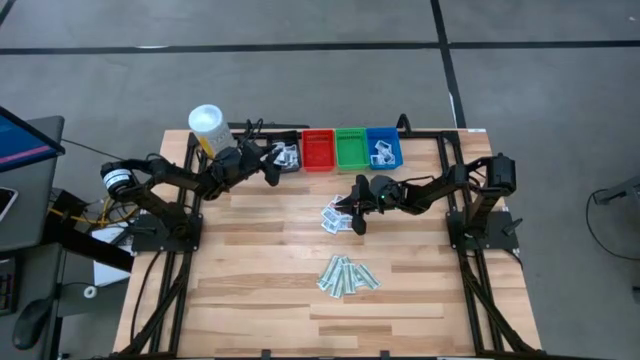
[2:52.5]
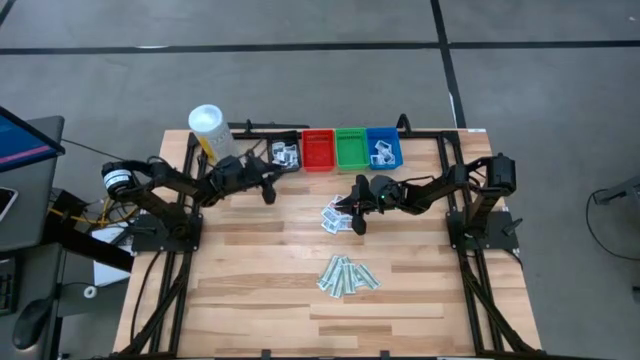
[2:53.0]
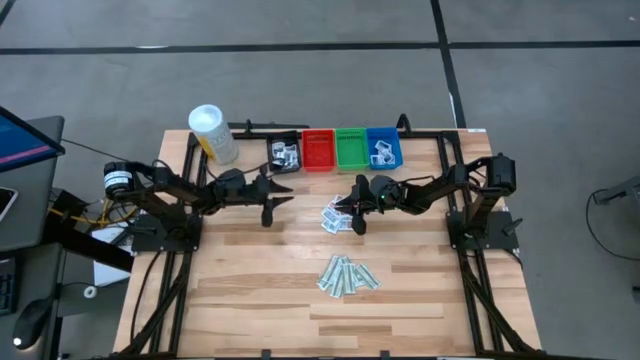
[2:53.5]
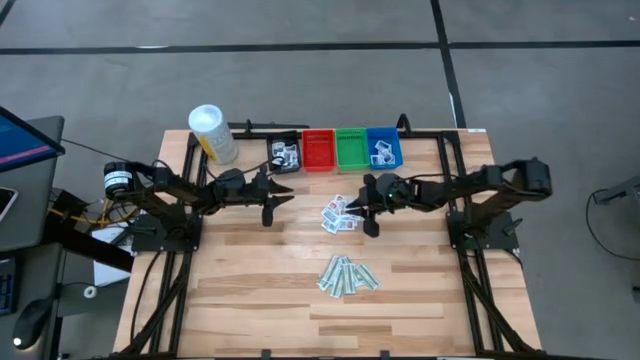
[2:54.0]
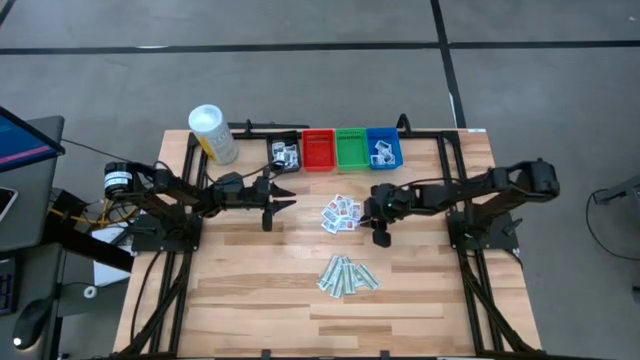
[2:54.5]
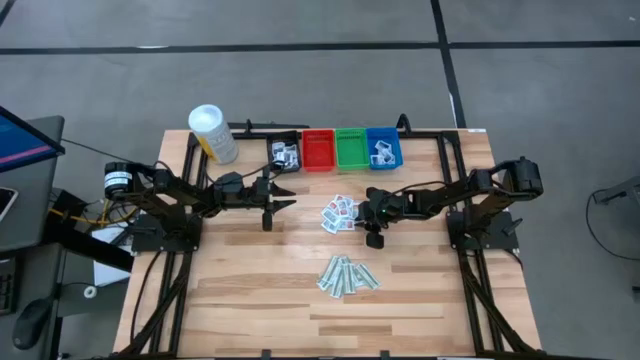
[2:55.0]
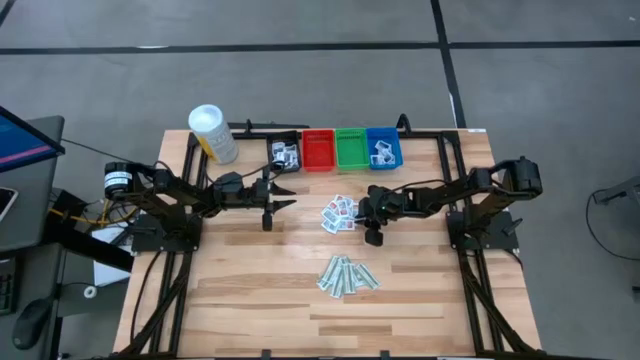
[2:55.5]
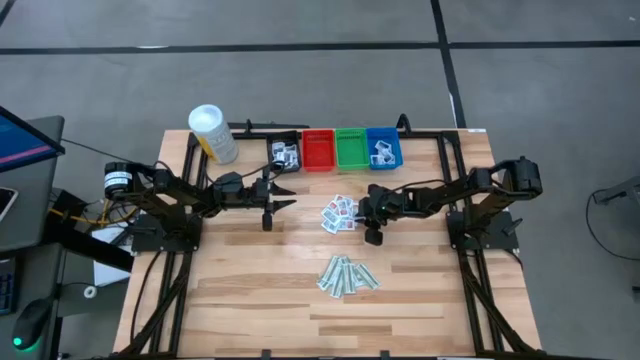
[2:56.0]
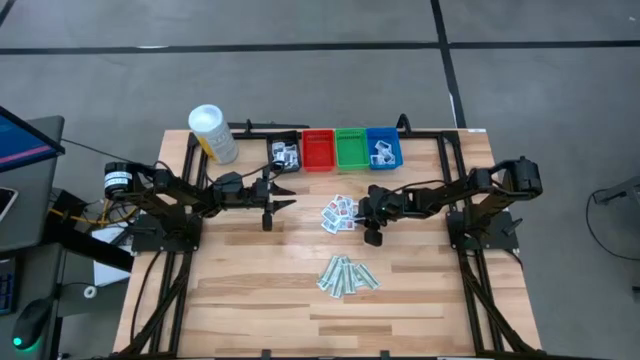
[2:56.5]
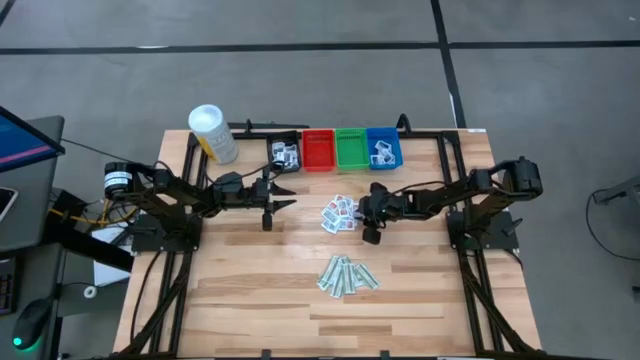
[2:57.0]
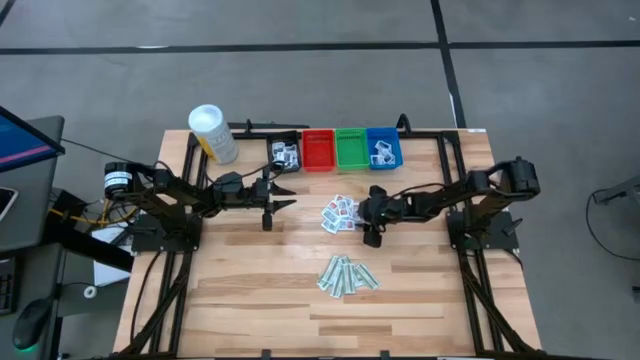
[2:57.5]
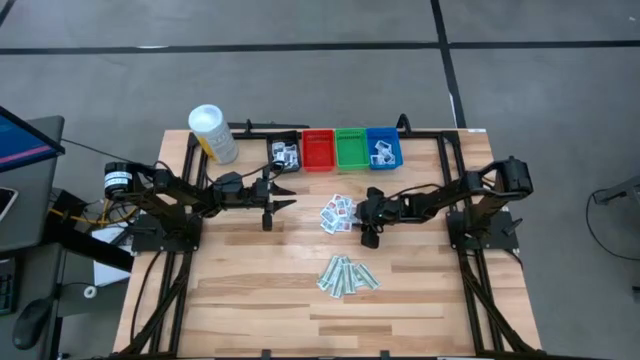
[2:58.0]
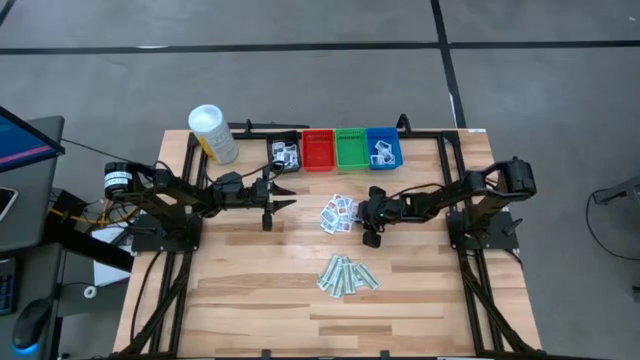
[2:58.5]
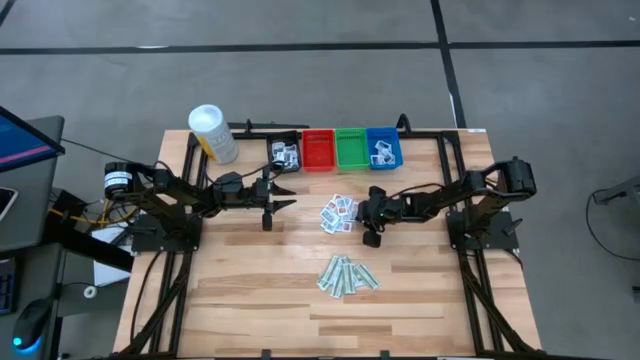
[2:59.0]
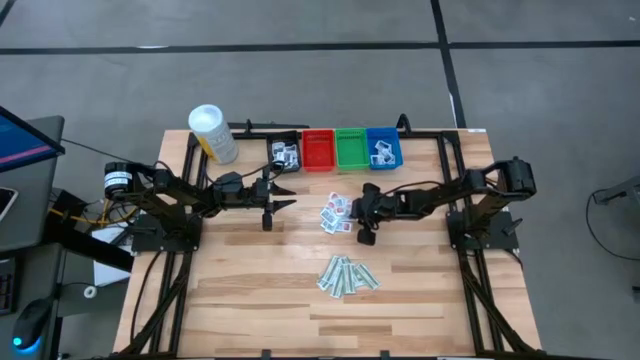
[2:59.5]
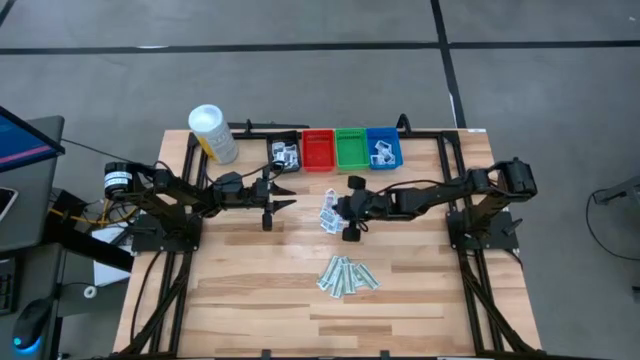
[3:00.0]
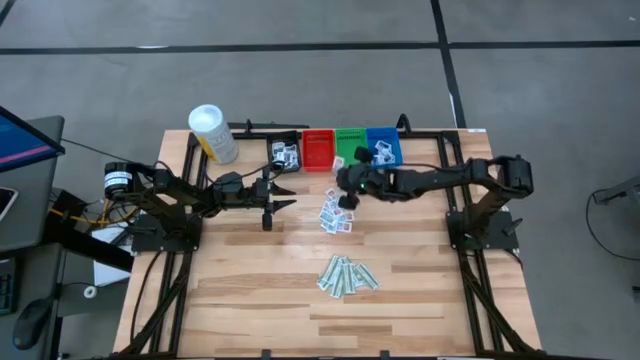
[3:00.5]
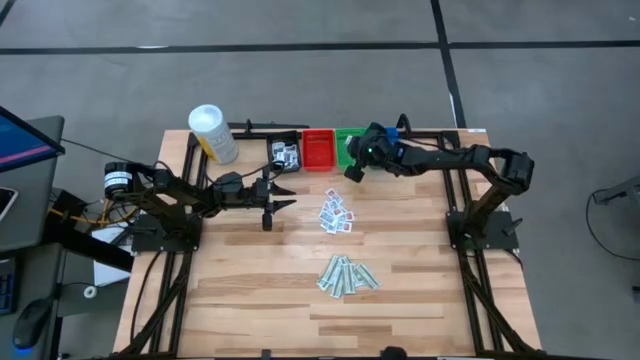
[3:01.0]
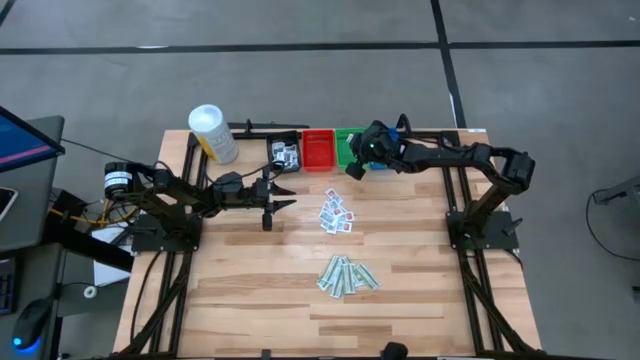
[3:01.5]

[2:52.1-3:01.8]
Task: Pick & Place First Aid Supplies
Put the orange ointment pack into the green bin

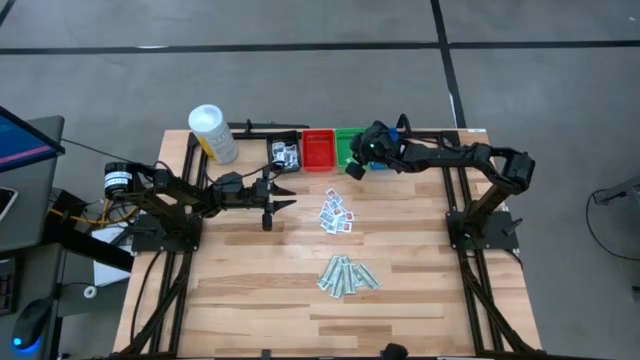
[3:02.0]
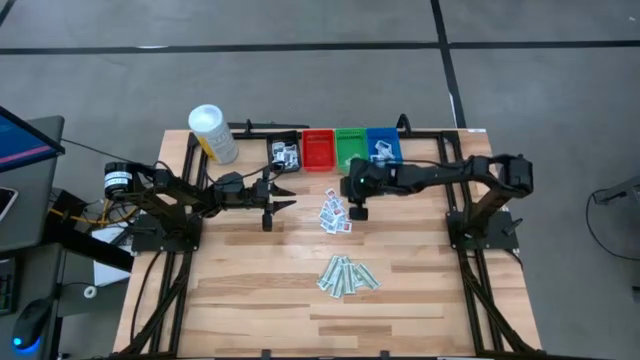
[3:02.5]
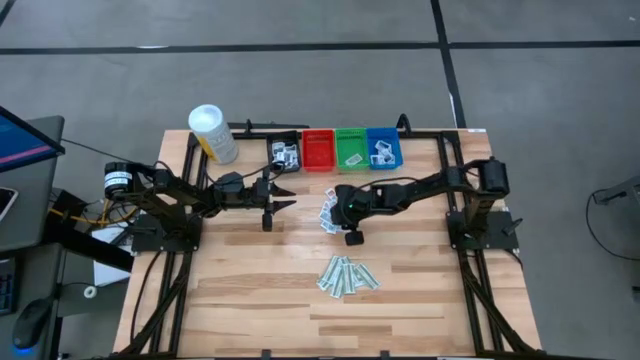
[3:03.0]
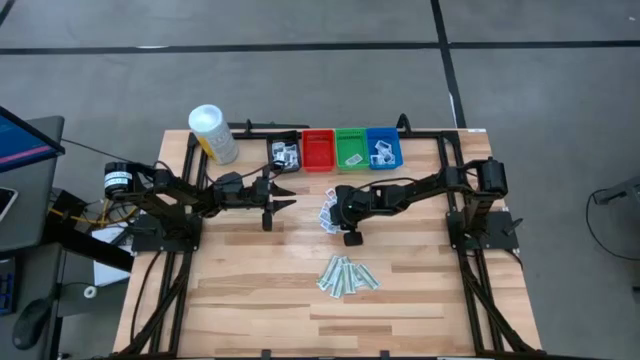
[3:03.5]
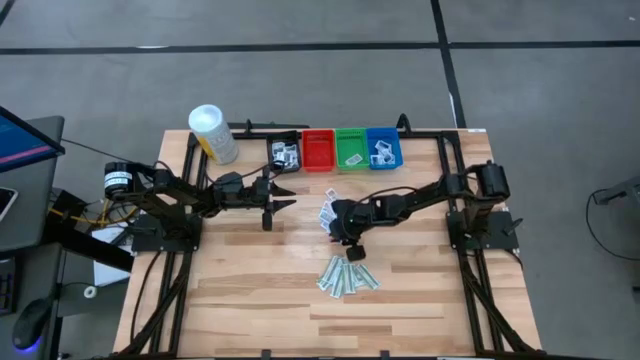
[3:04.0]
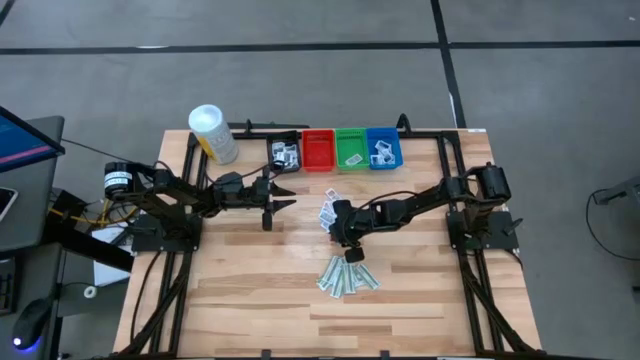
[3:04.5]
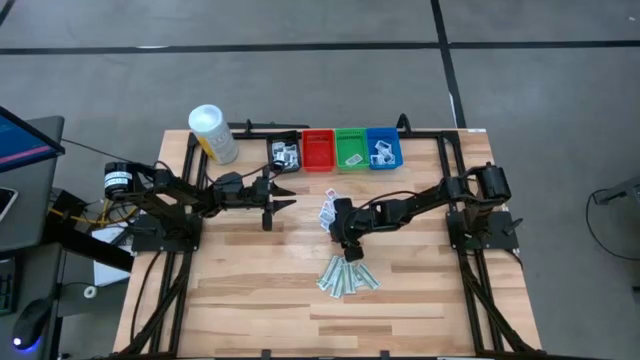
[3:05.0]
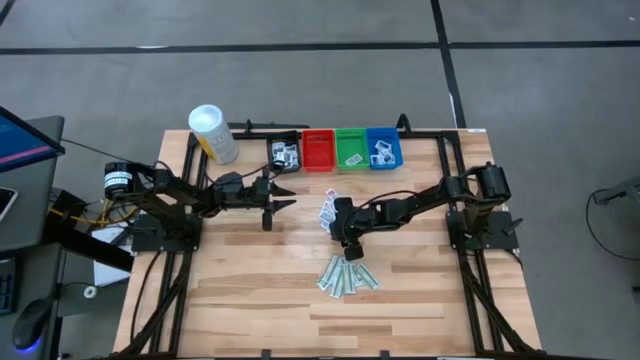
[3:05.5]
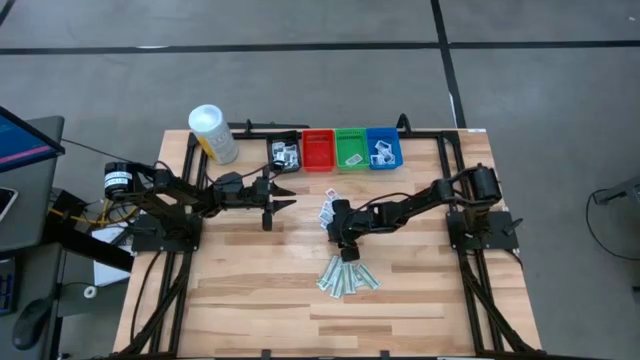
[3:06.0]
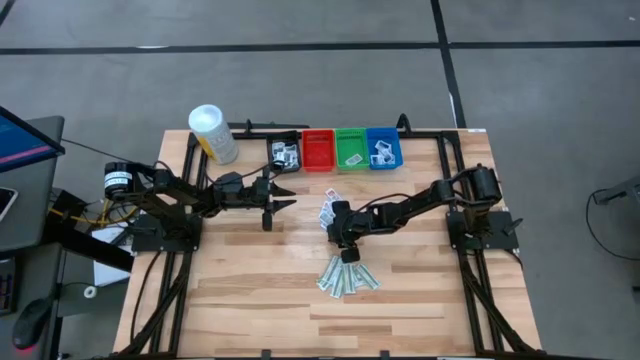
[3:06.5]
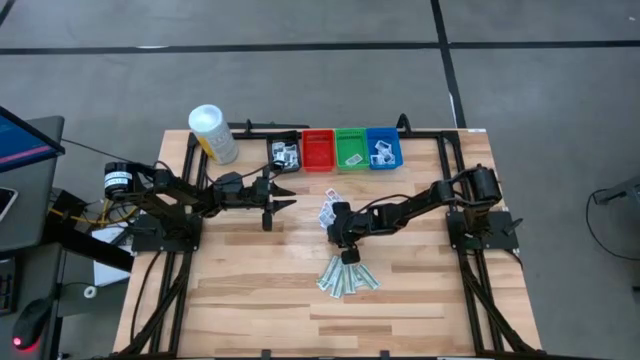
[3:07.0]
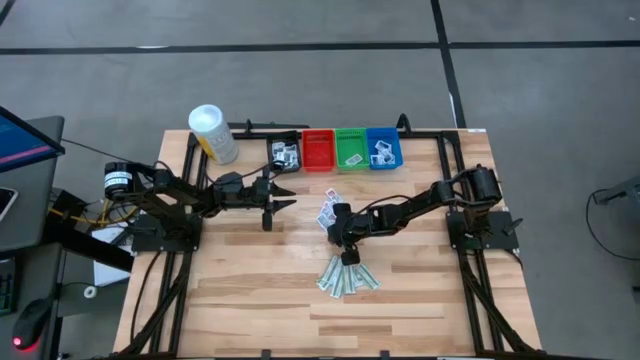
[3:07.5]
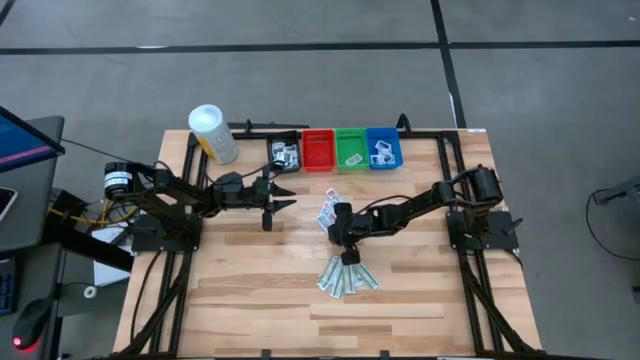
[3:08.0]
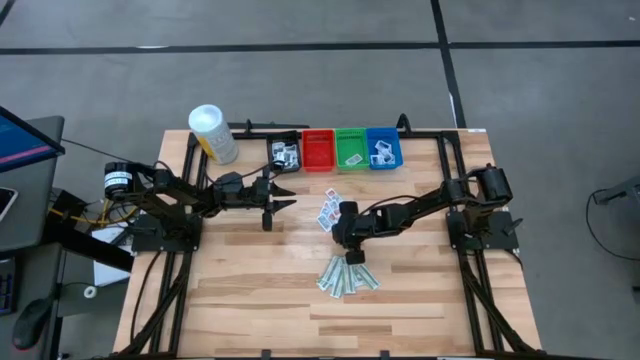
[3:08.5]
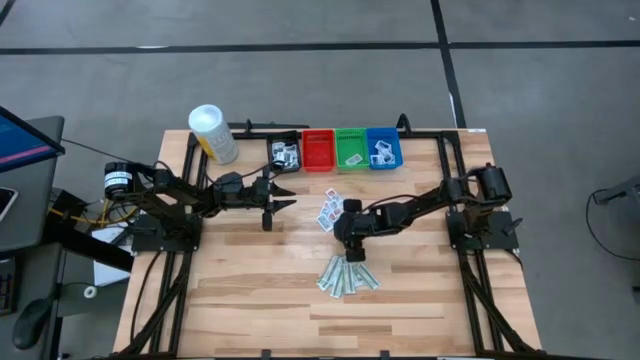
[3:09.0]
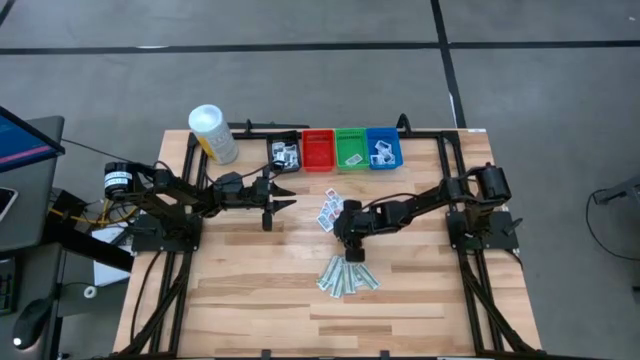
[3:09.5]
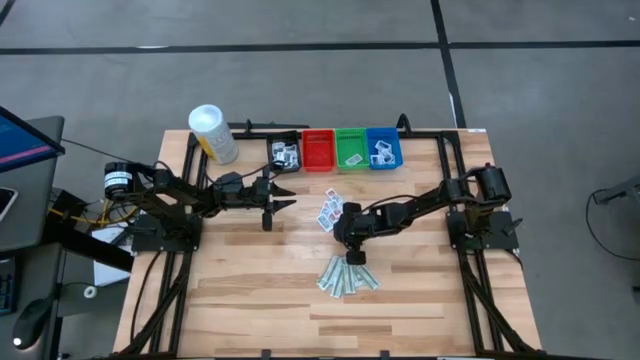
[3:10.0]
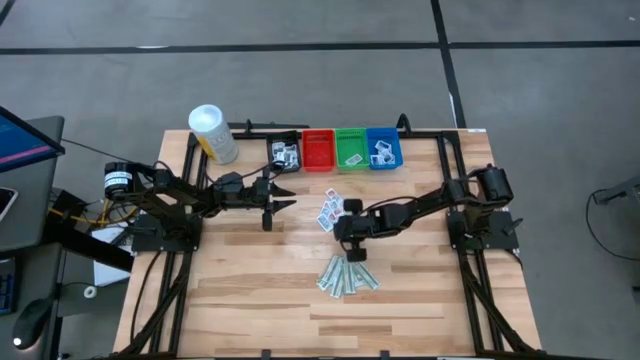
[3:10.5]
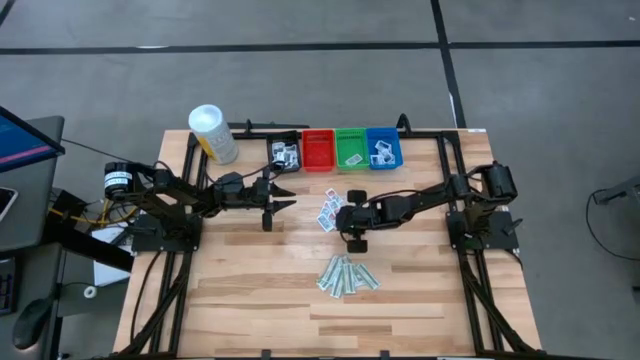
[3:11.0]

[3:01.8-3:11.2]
Put the orange ointment pack into the green bin

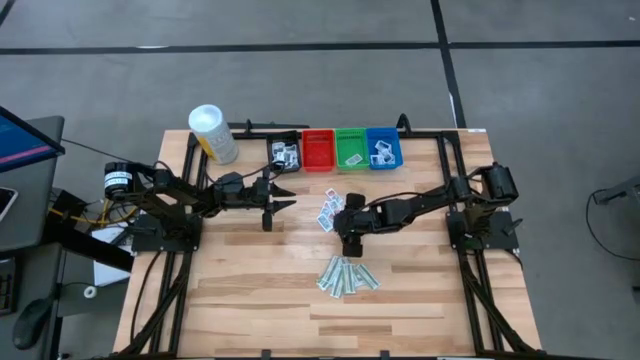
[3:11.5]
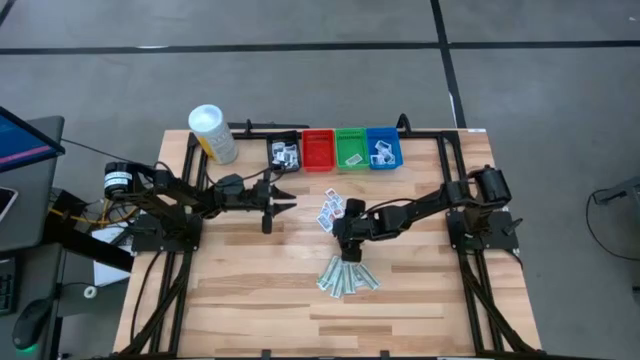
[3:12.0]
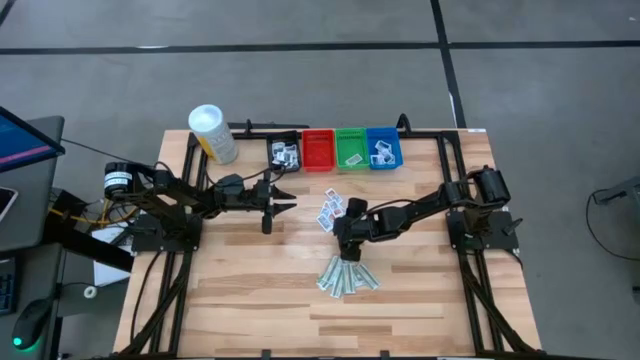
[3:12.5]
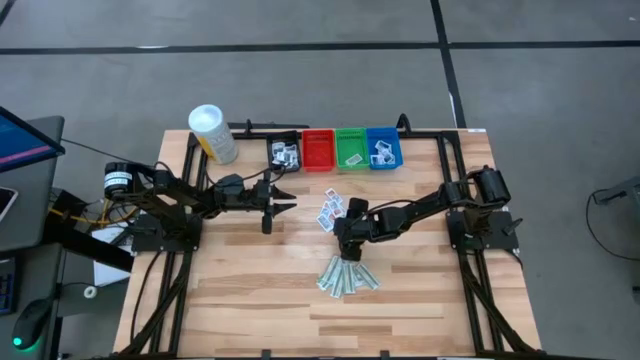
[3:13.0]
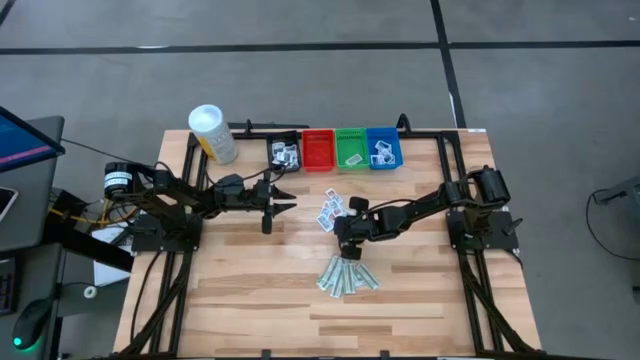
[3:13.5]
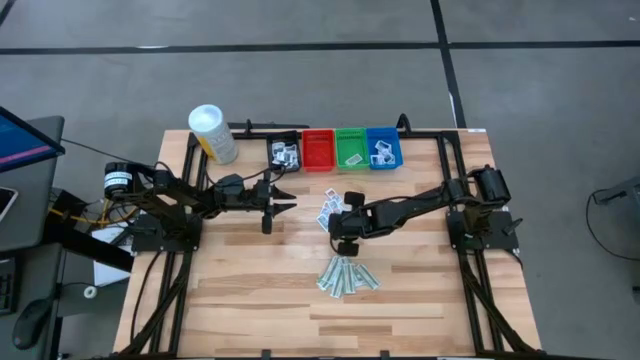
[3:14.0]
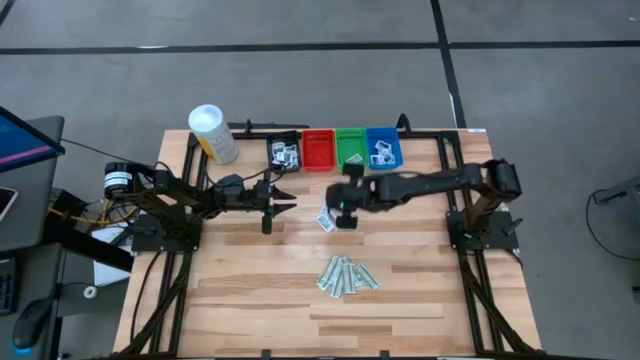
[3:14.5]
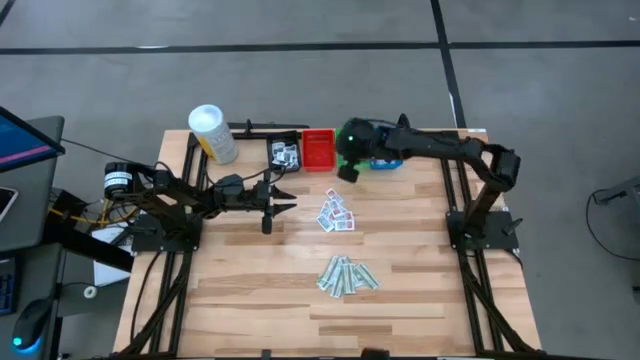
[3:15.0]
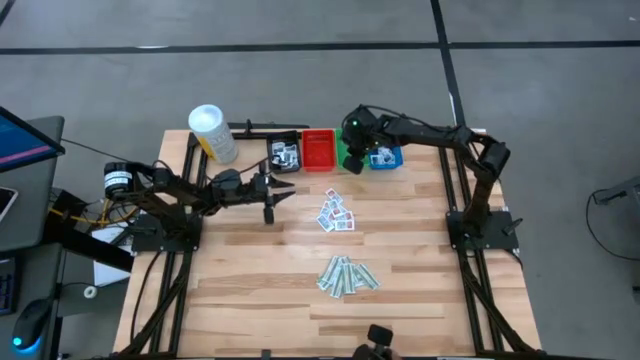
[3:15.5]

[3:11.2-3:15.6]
Put the orange ointment pack into the green bin
